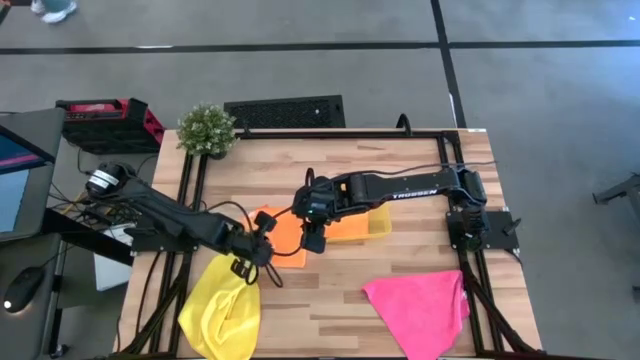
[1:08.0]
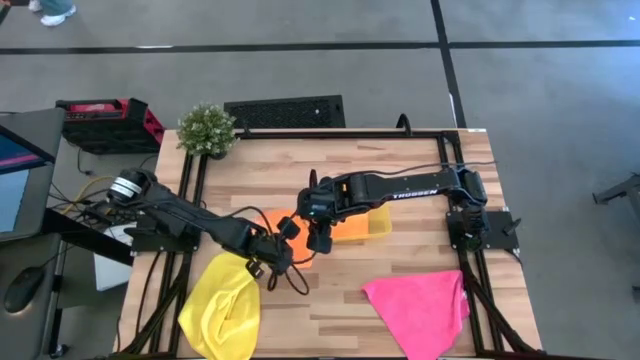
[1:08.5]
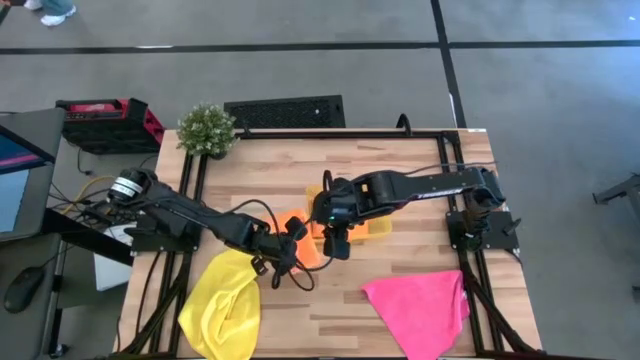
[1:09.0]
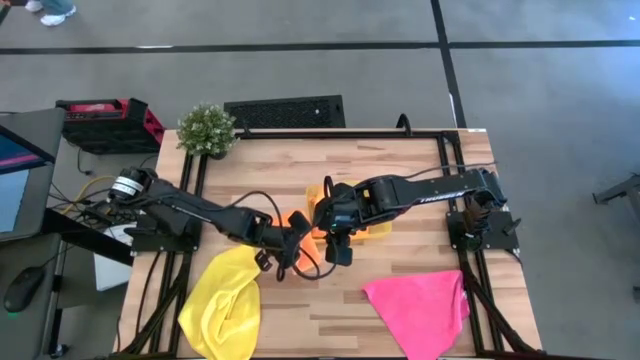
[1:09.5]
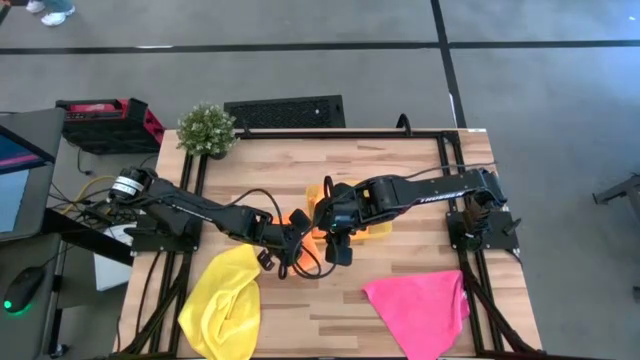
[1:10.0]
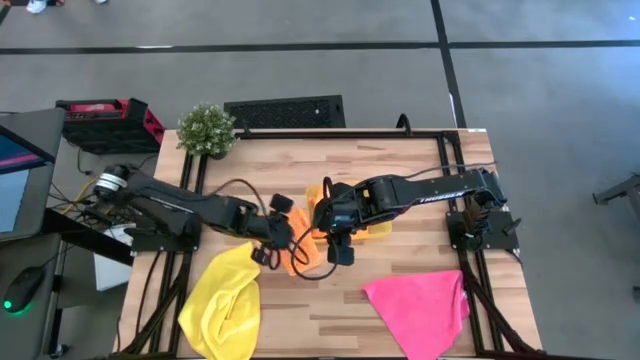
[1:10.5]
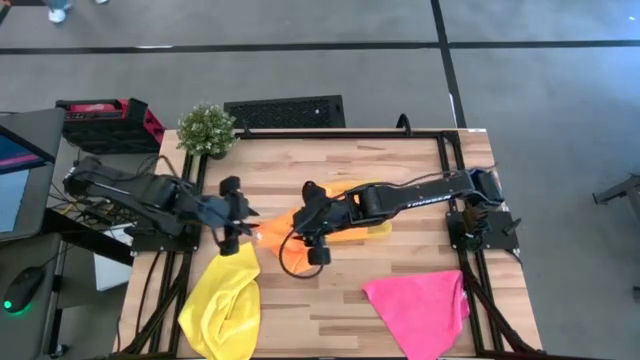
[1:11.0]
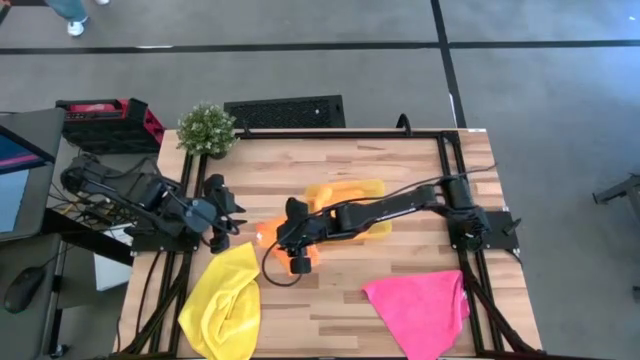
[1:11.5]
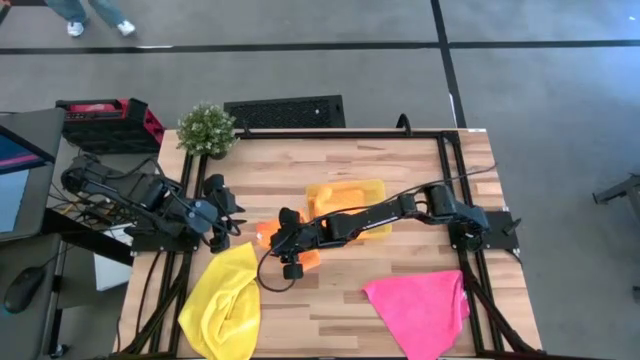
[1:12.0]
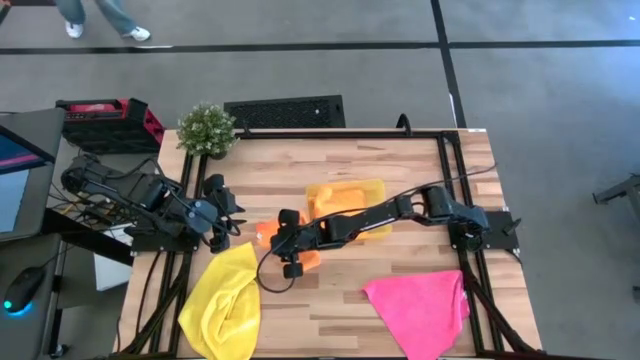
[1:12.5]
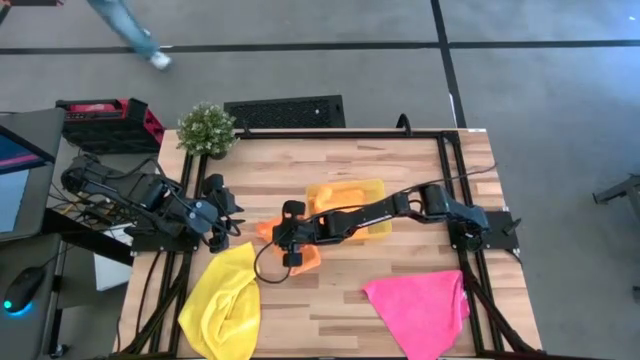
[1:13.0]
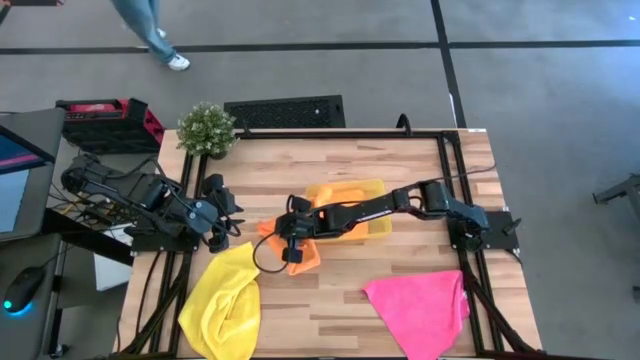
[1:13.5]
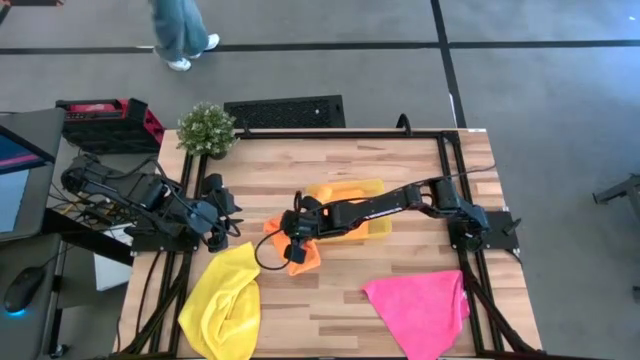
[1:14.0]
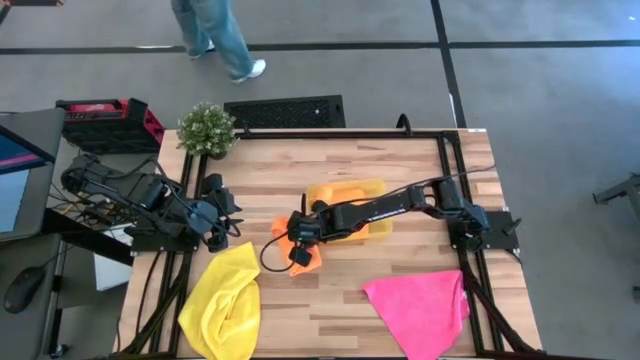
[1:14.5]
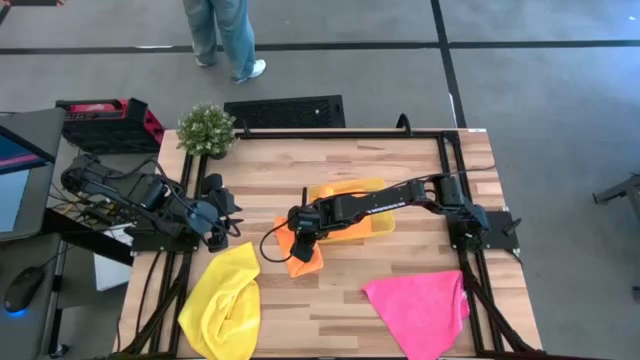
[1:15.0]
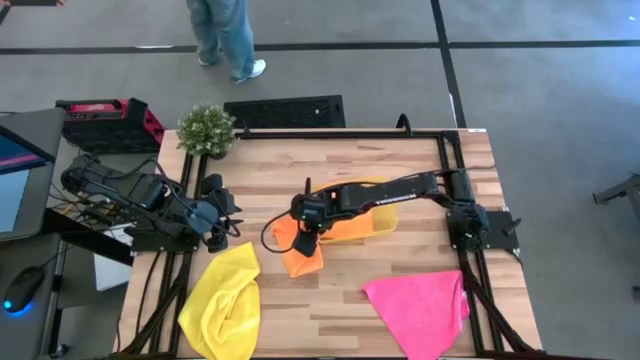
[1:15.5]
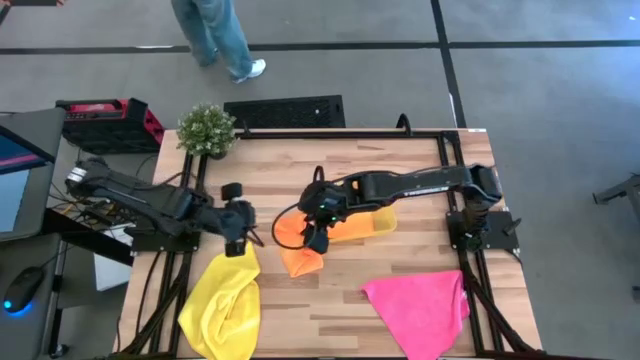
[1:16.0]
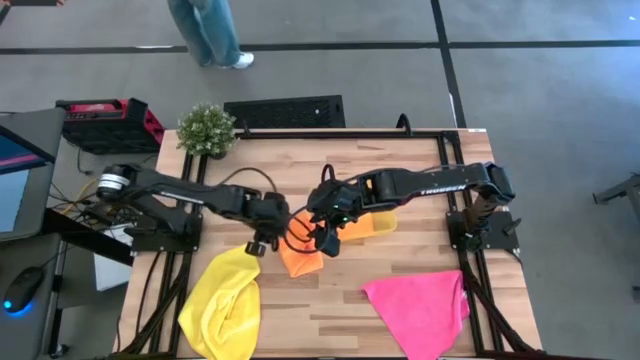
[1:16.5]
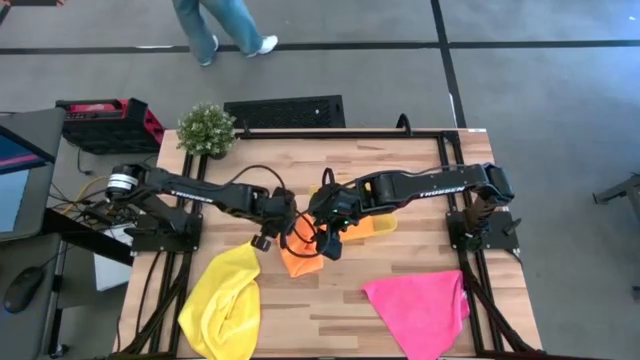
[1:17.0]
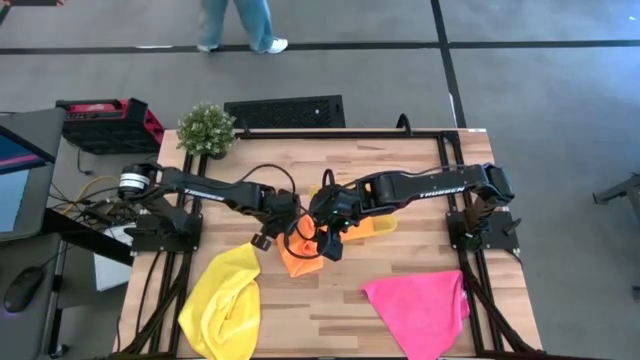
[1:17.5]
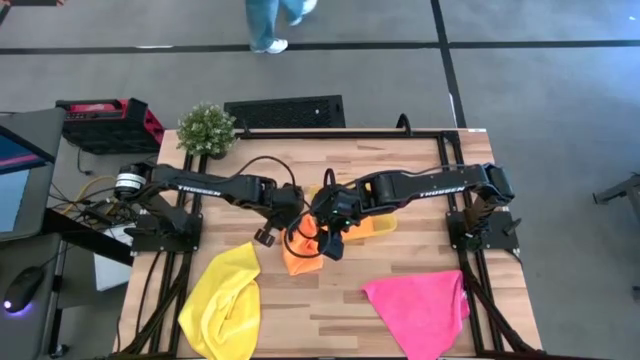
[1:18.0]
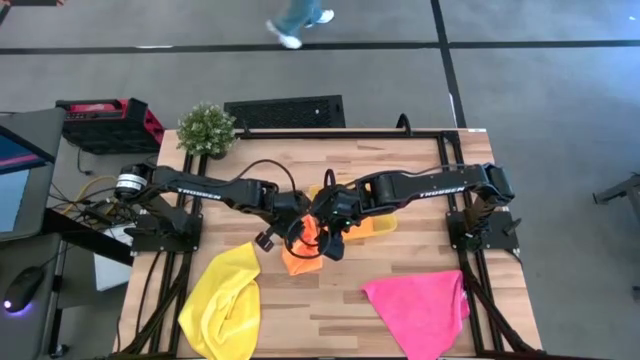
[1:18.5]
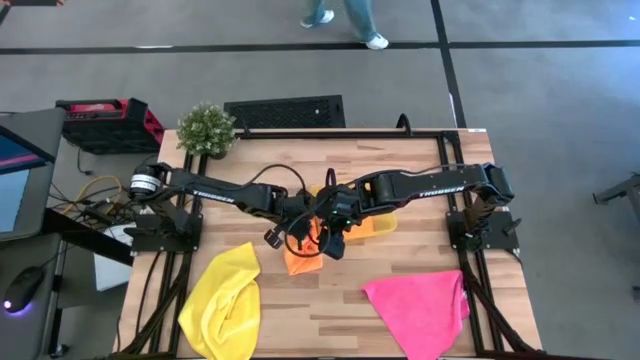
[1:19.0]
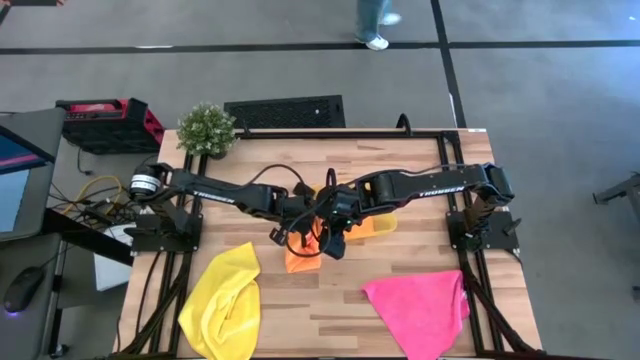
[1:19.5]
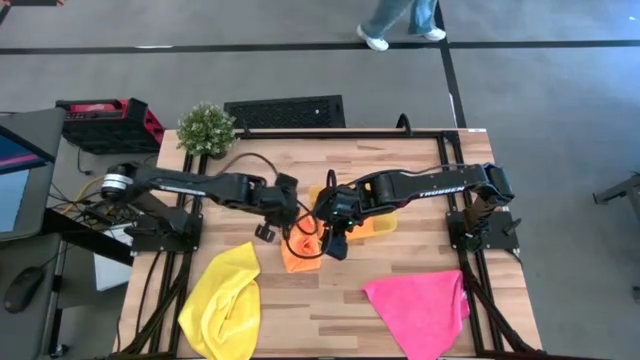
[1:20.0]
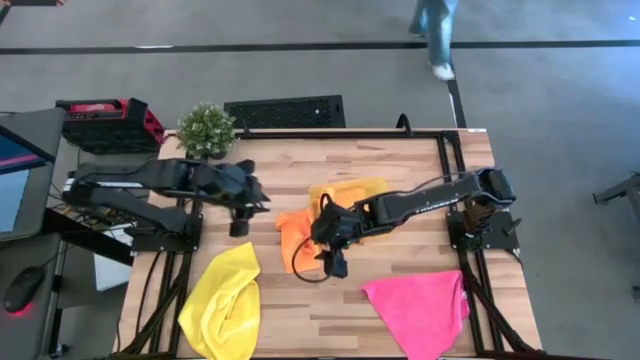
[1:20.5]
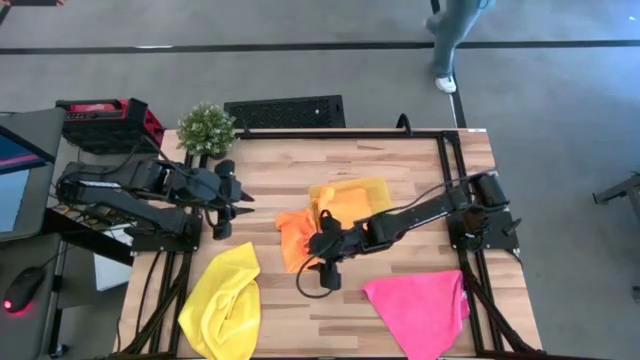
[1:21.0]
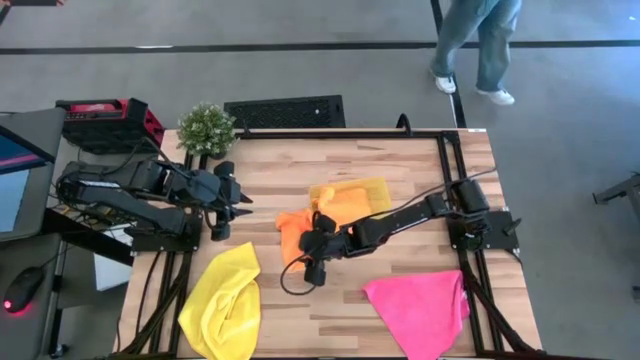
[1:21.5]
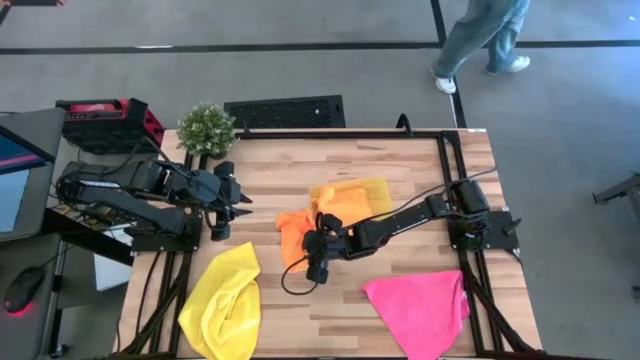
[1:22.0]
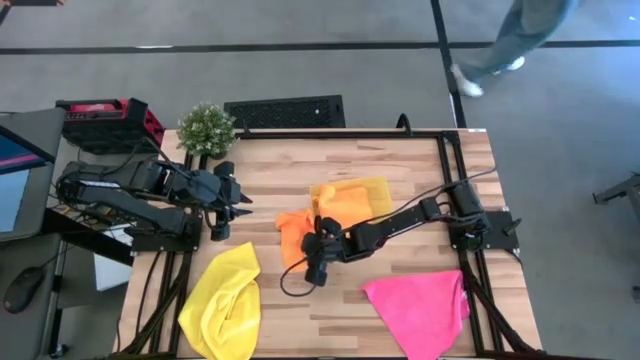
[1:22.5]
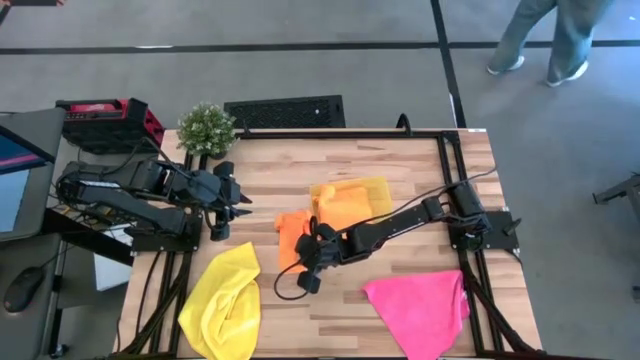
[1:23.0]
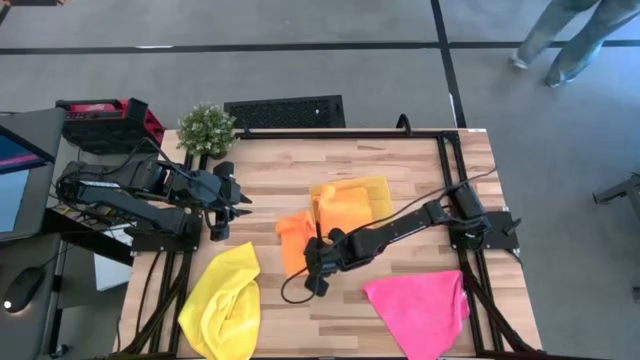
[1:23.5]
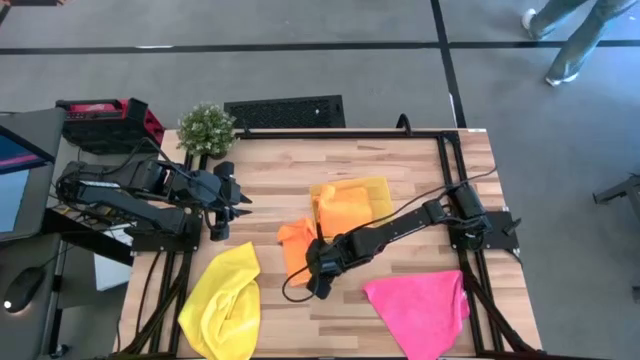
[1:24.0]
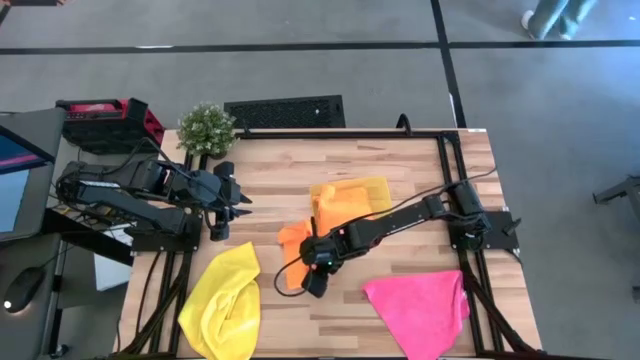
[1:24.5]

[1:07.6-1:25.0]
Task: Fold microfiber towels
Fold the orange microfiber towel

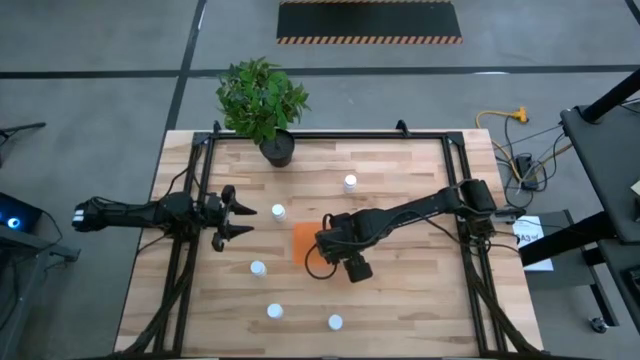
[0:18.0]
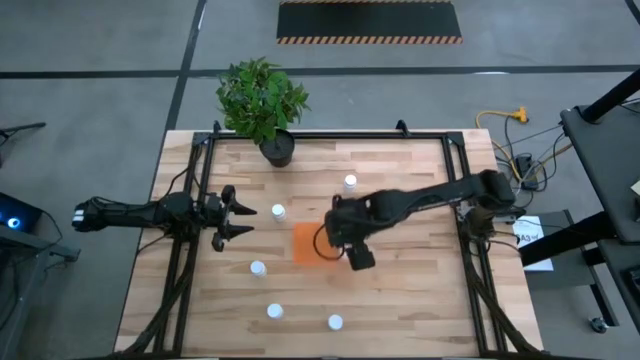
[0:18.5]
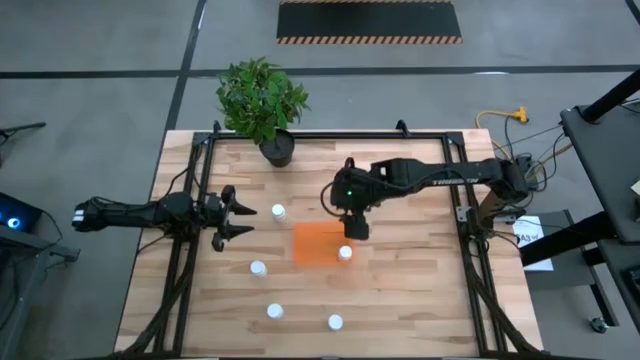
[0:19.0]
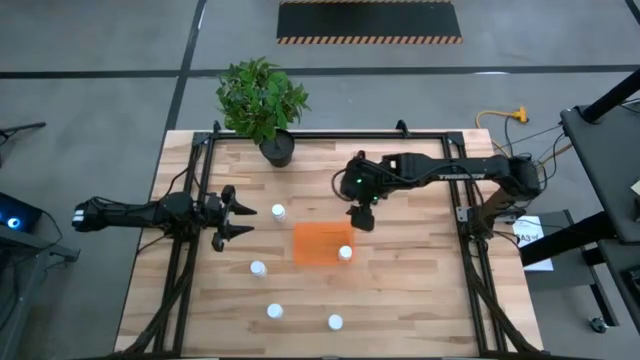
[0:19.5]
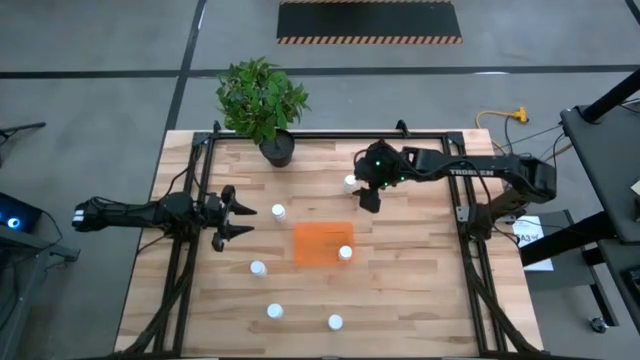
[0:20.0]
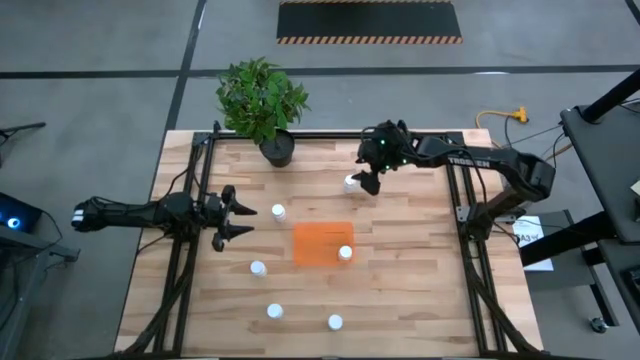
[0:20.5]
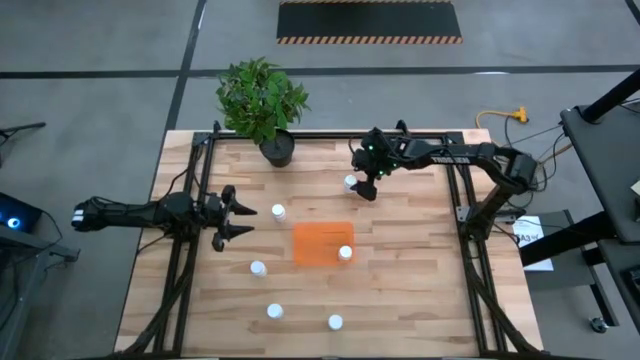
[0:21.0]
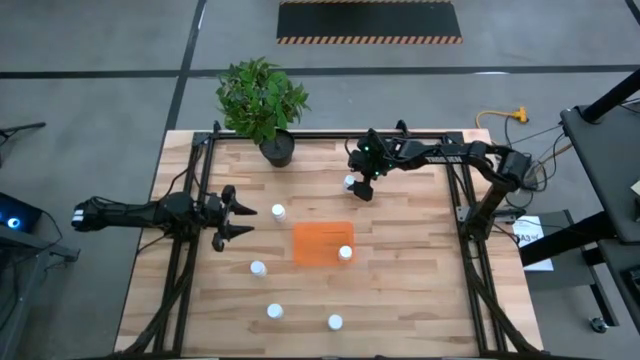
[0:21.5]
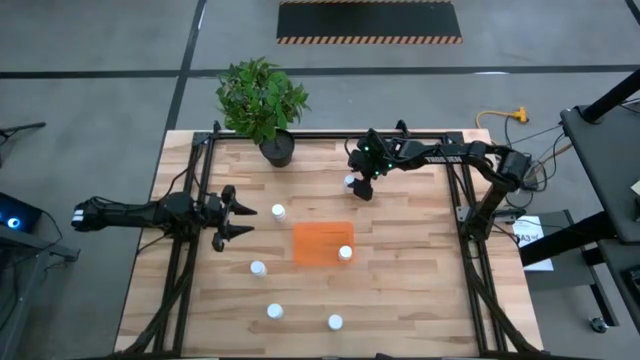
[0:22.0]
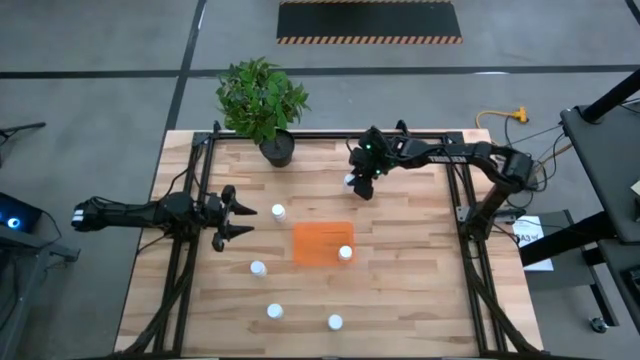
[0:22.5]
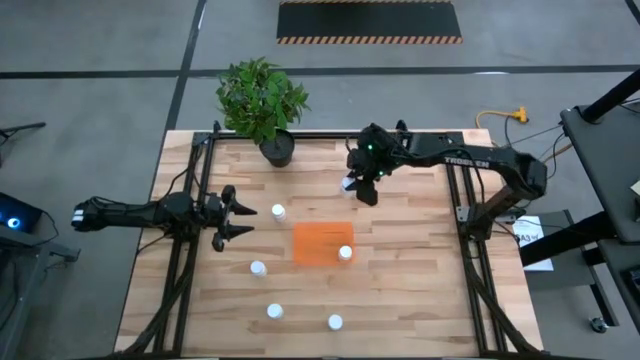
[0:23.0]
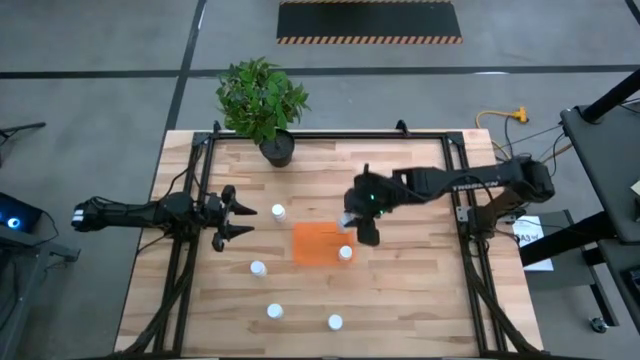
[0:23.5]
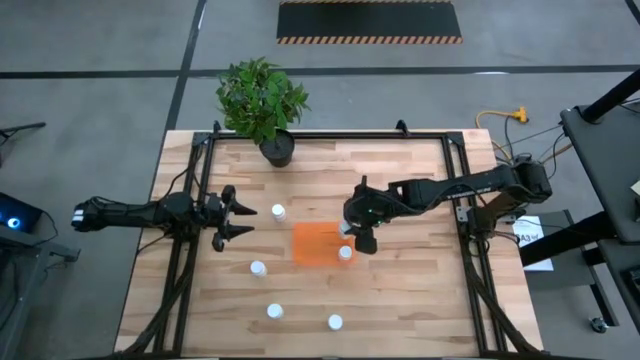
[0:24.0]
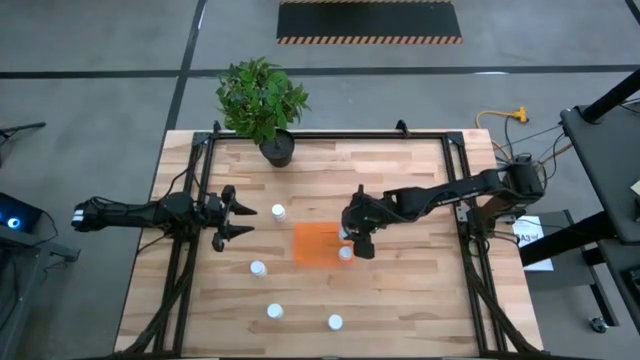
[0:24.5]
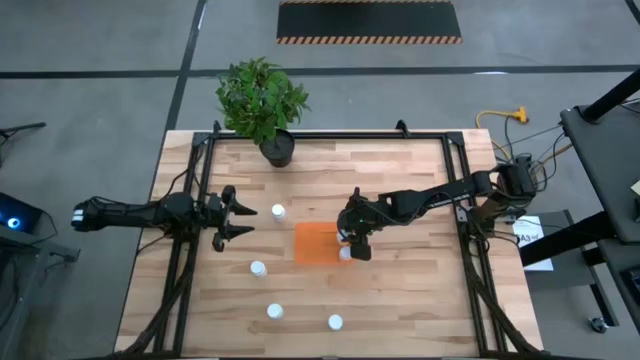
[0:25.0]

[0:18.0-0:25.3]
Task: Pick and place pill bottles into a basket
Put the white pill bottle into the orange bin
